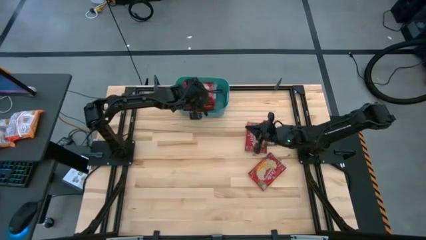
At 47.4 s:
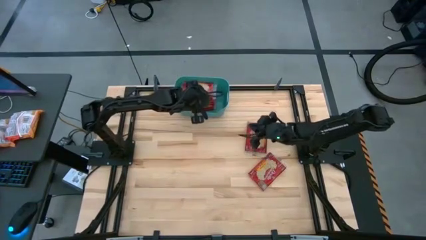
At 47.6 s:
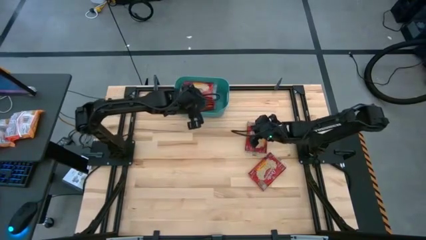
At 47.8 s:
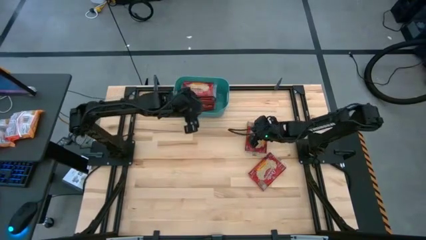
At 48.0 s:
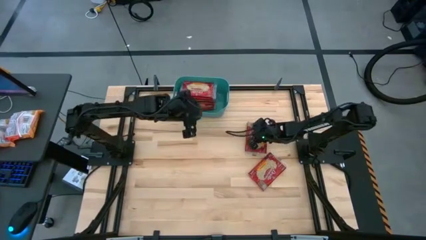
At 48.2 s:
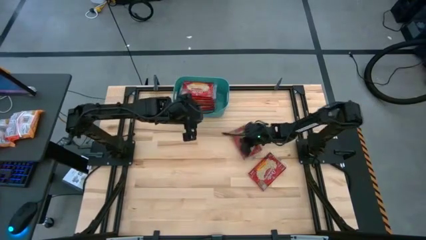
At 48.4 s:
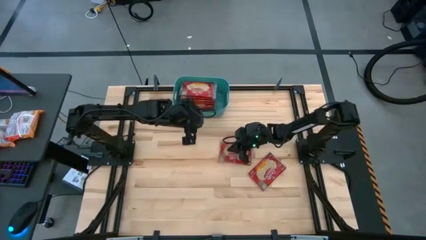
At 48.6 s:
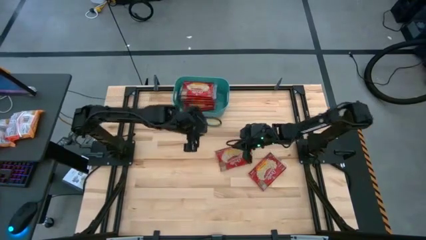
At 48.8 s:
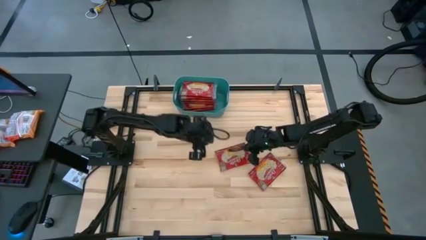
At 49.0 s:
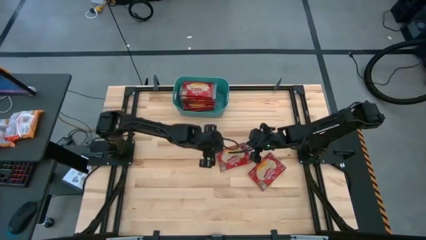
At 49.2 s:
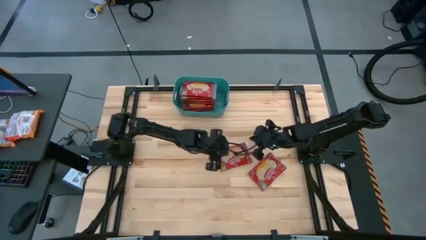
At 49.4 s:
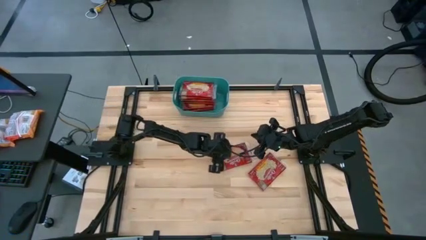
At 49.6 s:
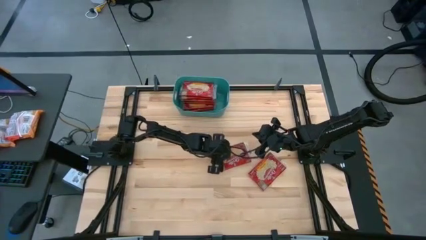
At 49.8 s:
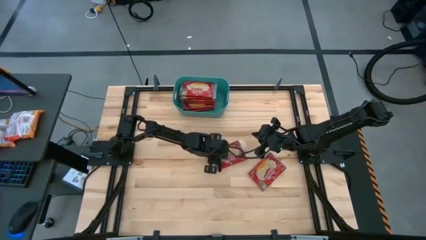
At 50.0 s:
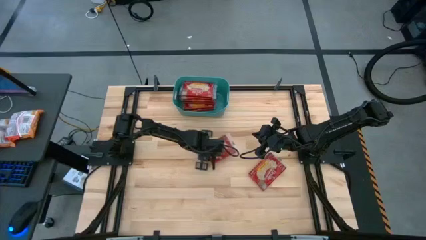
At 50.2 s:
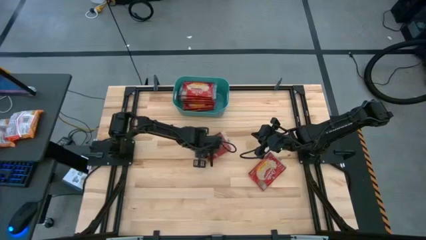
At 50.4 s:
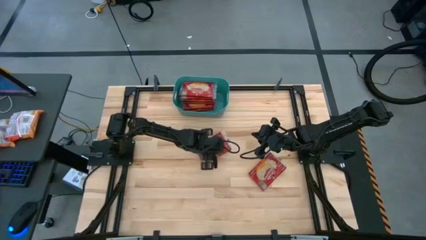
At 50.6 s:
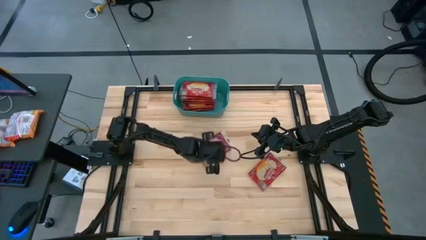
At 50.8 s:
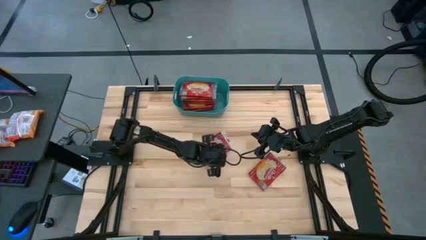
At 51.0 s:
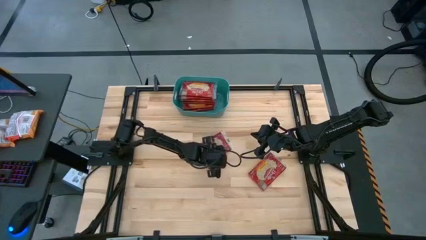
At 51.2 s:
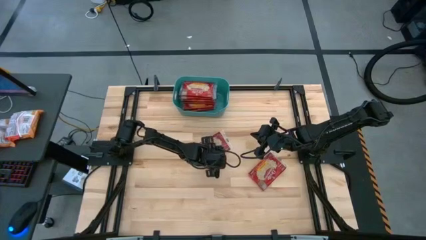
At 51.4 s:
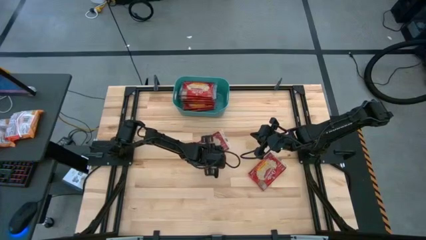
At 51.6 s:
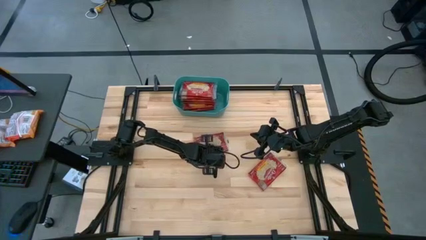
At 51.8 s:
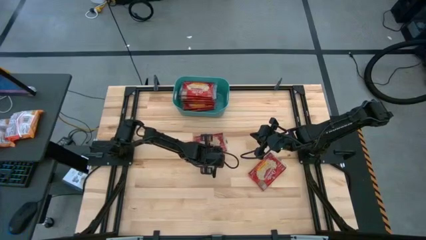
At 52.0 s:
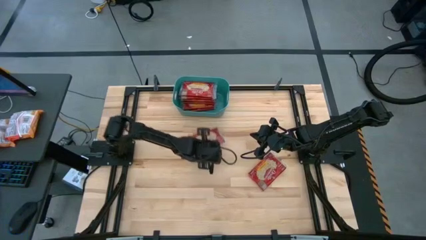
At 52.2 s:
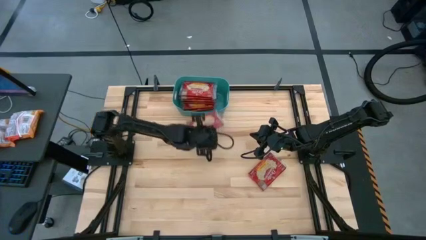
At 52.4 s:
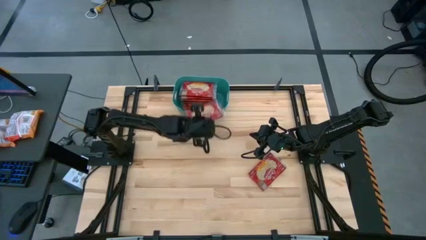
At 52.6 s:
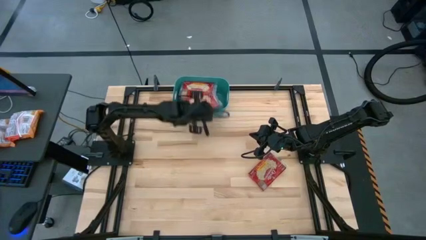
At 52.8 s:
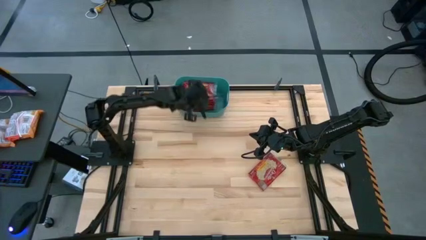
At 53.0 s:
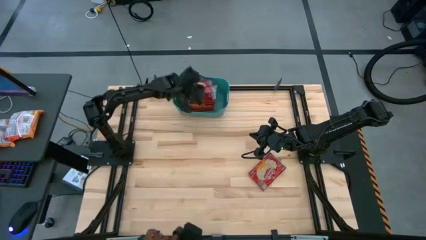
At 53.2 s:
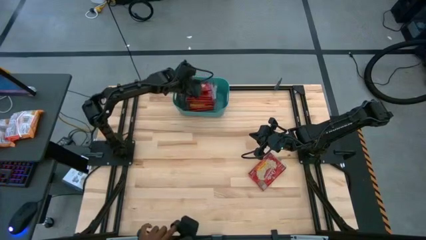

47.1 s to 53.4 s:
Task: Sort popcorn bags into baskets
Put the popcorn bag into the green bin

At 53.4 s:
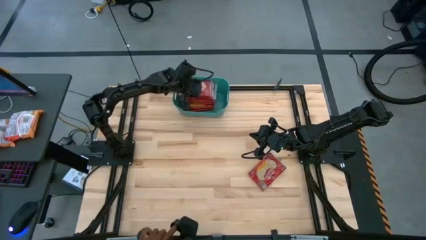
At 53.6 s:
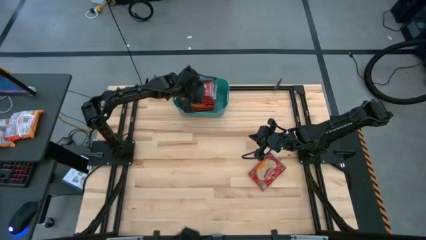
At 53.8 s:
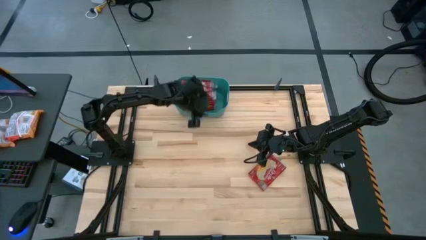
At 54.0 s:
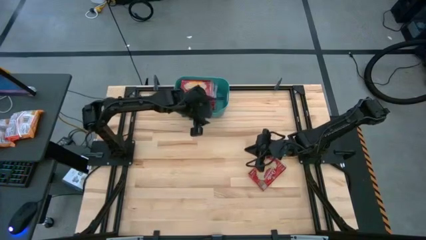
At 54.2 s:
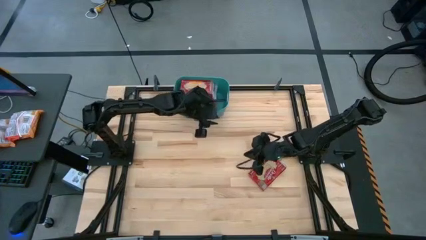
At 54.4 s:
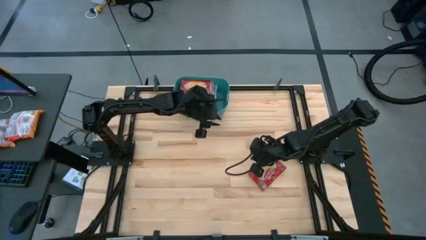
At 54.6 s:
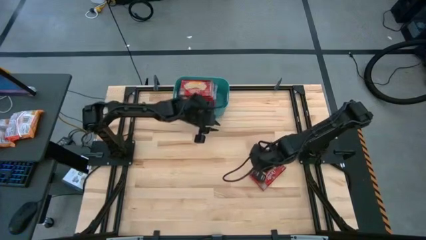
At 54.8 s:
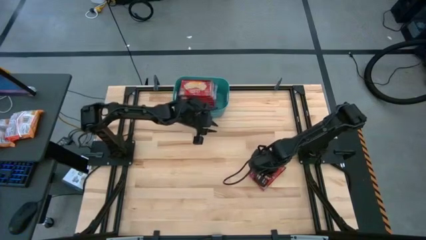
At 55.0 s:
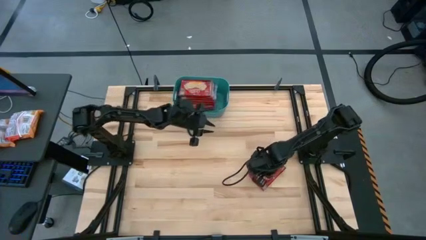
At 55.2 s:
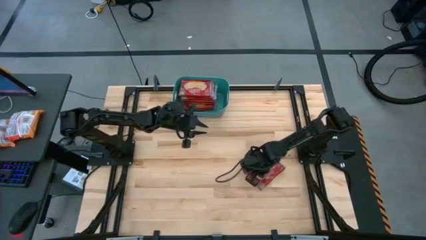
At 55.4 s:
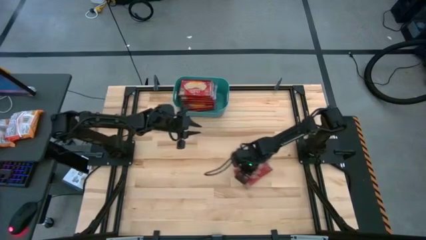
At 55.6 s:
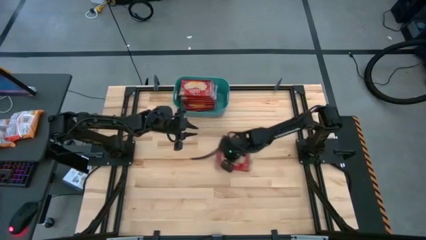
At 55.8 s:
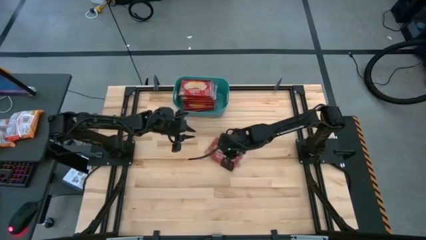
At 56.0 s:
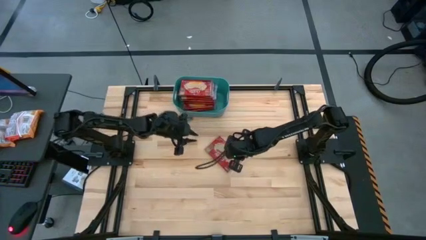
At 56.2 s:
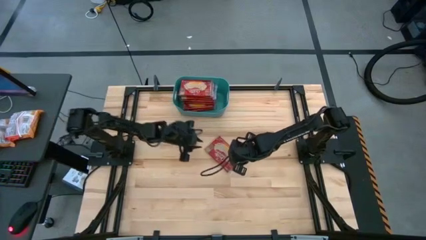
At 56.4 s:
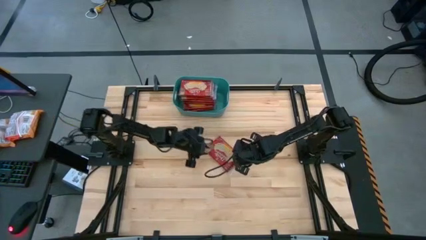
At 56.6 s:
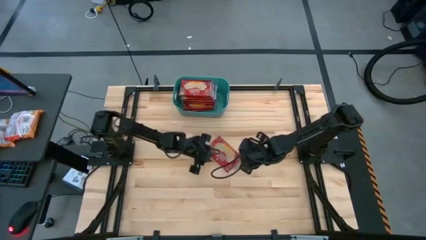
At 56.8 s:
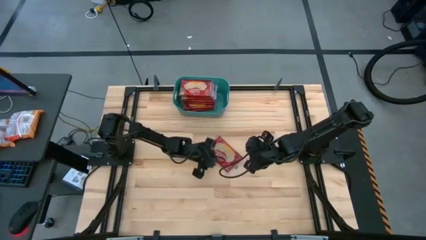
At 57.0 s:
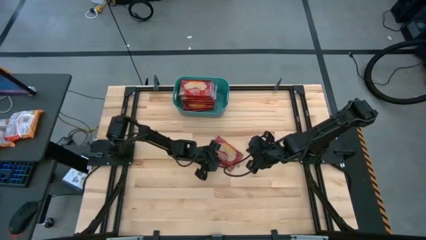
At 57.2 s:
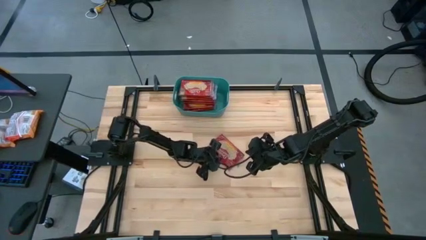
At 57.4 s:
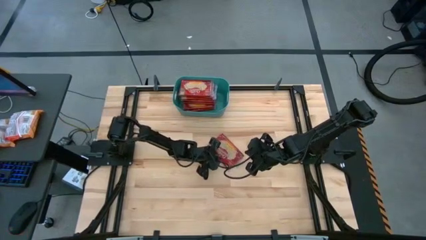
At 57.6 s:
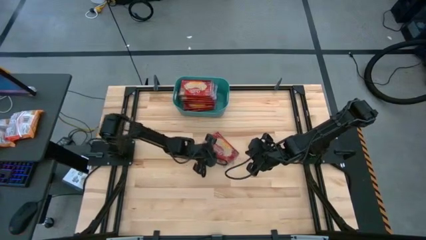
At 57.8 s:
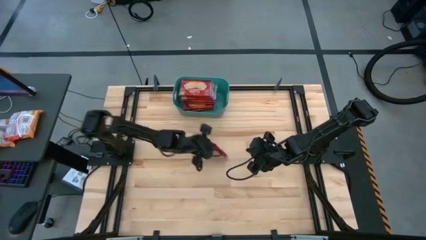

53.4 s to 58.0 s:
Put the popcorn bag into the green bin

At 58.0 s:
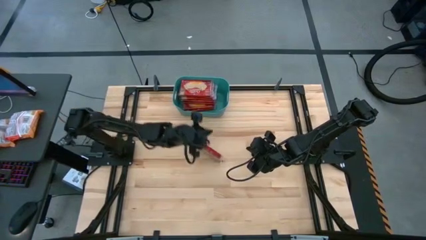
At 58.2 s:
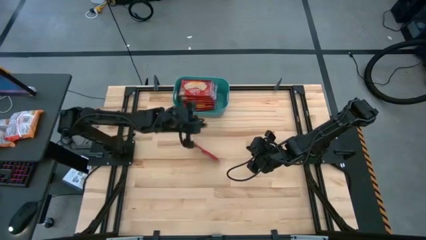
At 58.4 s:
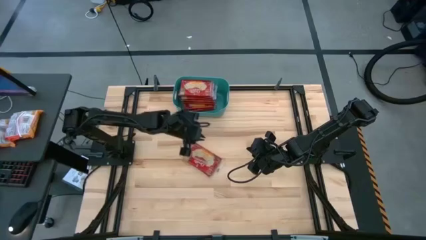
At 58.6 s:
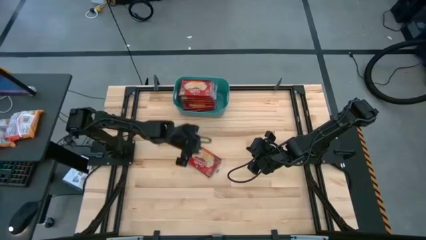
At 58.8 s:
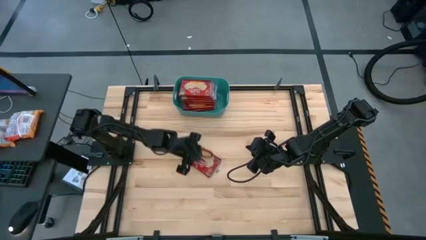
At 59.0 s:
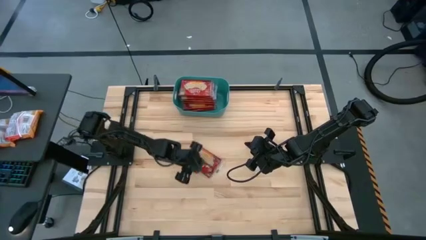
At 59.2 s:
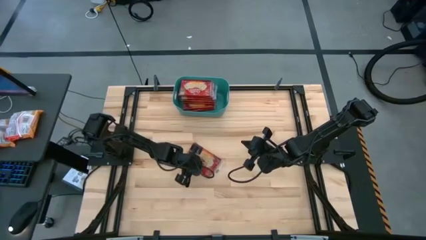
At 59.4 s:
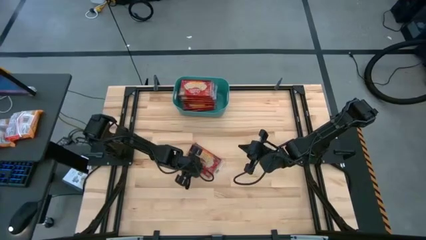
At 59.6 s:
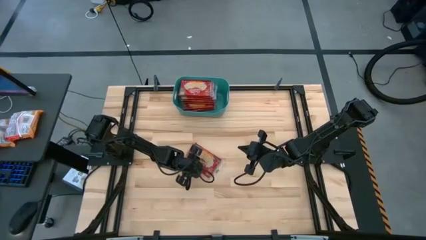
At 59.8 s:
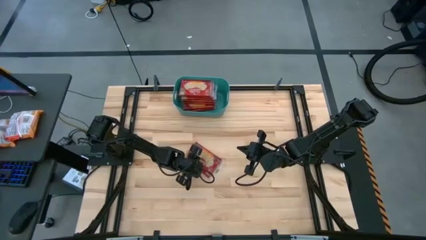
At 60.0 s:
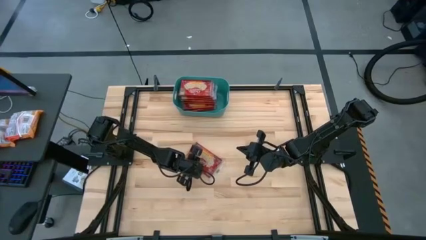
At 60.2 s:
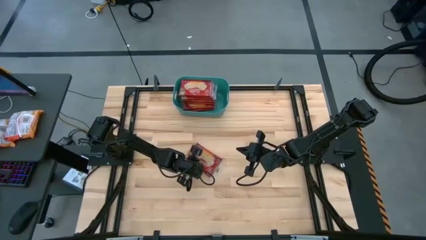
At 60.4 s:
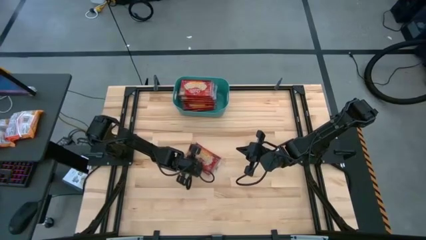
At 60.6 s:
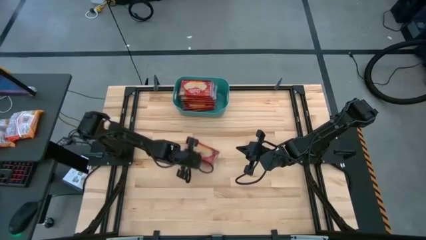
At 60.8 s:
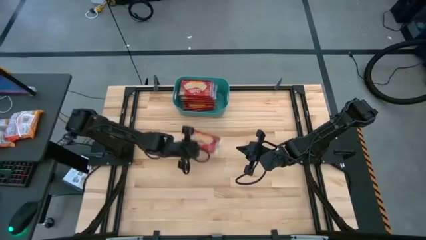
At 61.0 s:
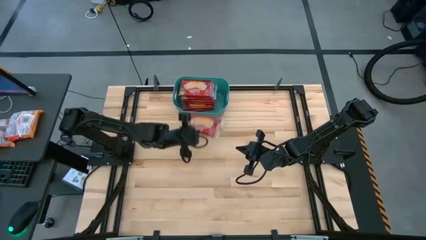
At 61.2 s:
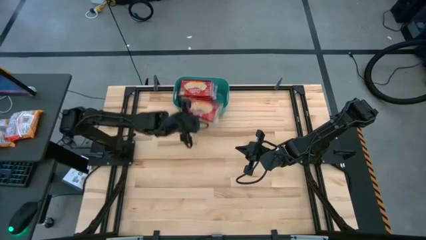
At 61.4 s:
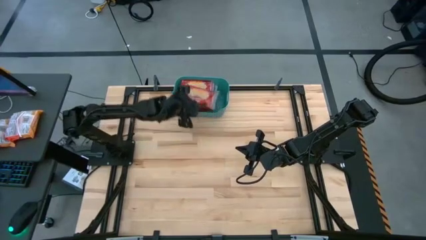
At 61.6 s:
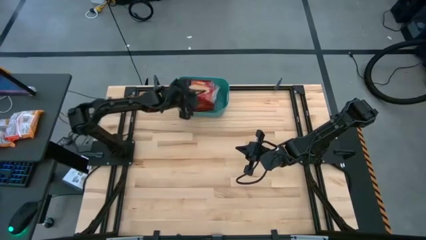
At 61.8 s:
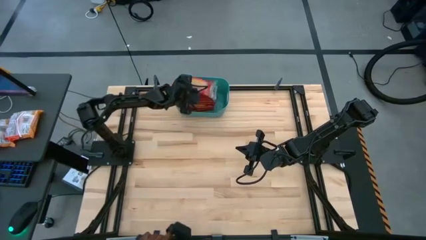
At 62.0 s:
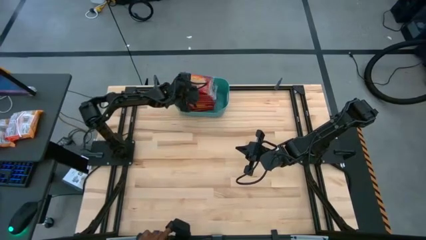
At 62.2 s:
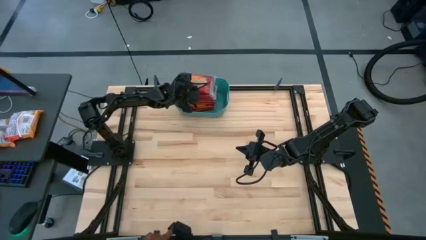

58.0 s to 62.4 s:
Put the popcorn bag into the green bin

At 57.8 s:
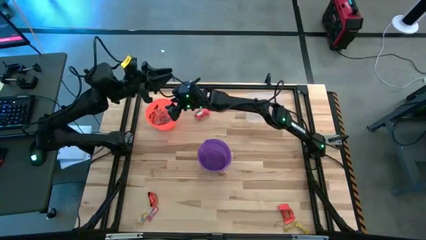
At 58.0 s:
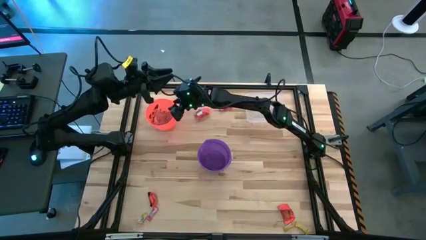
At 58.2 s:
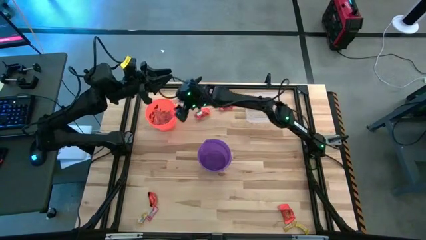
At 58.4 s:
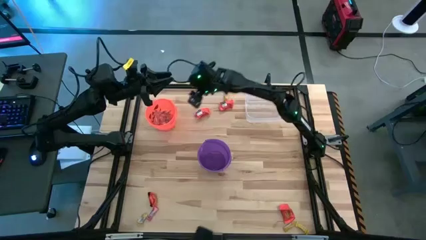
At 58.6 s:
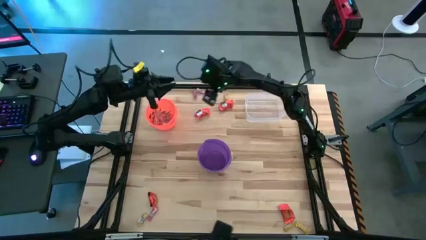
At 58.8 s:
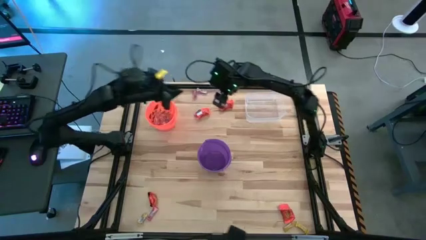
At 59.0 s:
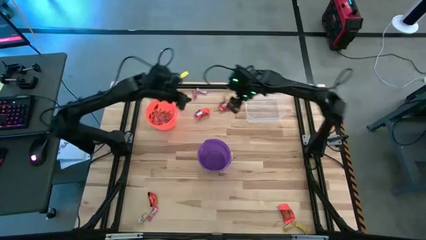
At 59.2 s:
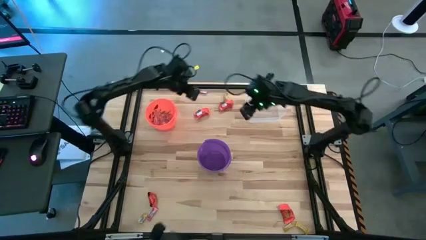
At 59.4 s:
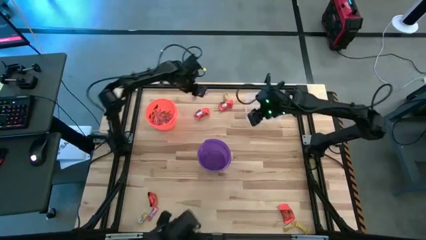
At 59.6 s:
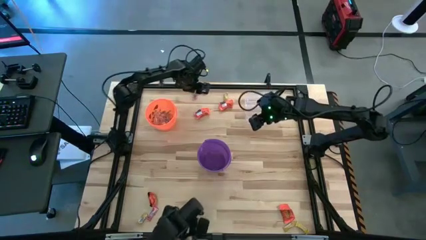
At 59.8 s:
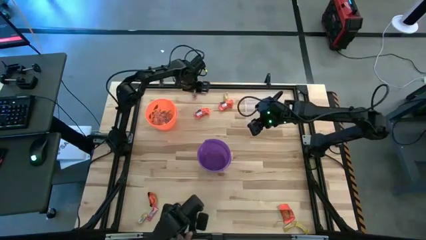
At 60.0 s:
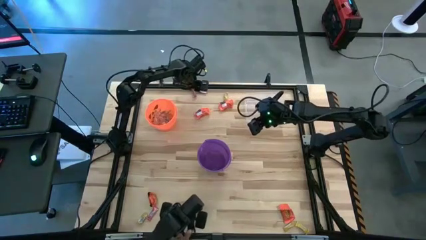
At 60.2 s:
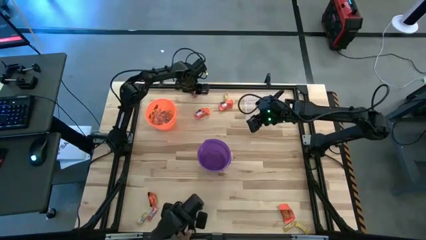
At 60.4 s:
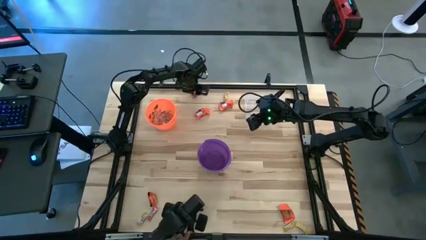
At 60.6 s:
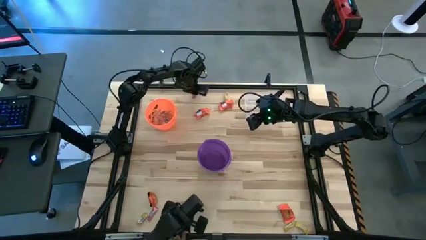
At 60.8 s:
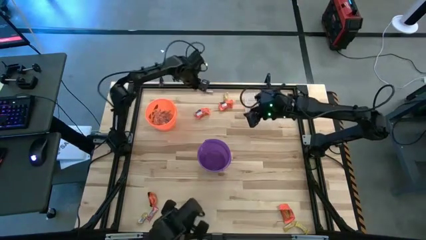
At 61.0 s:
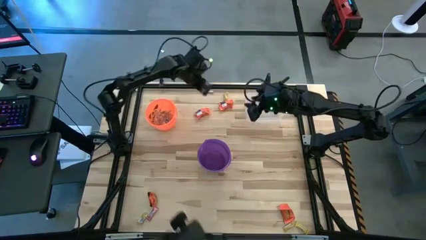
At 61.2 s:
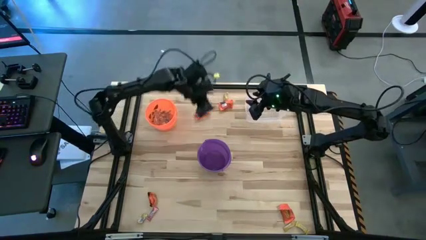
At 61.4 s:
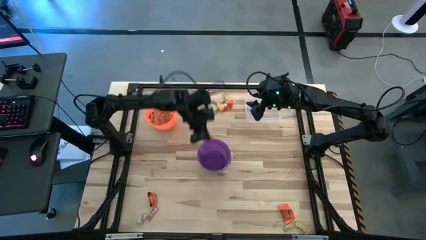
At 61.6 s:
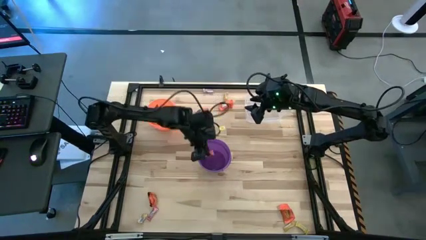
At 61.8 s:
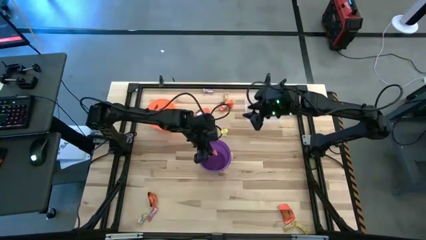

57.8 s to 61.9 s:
Task: Sort candy by brand, put in halloween buckets
Put the red candy into the purple bucket
